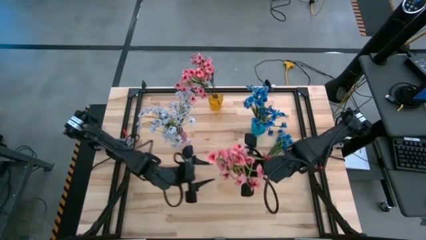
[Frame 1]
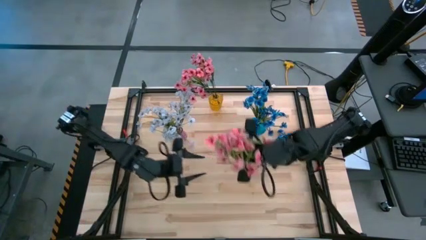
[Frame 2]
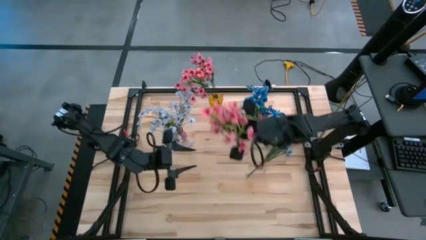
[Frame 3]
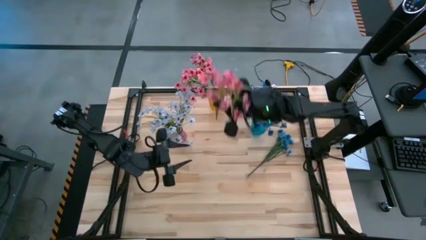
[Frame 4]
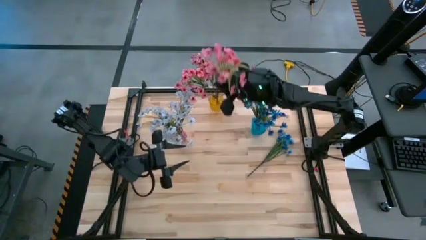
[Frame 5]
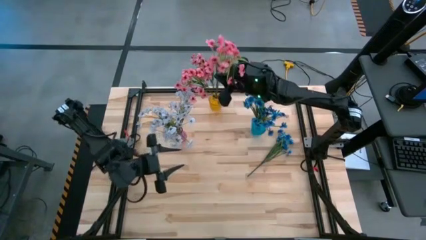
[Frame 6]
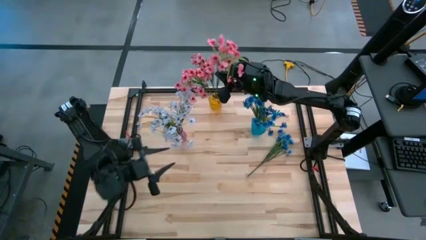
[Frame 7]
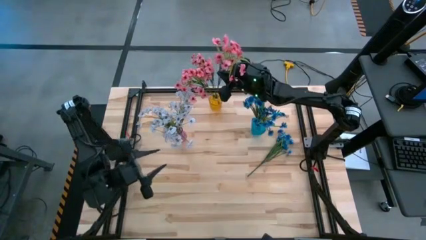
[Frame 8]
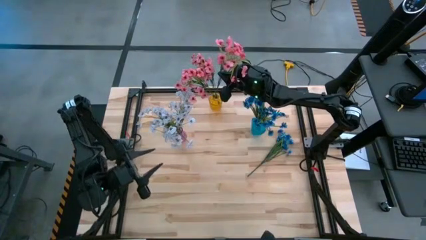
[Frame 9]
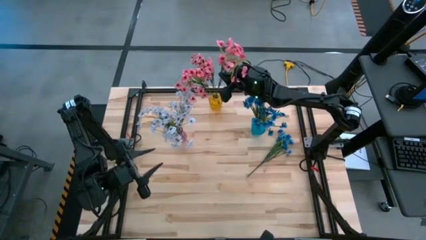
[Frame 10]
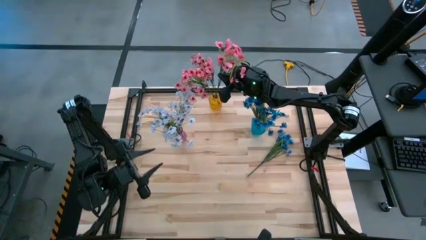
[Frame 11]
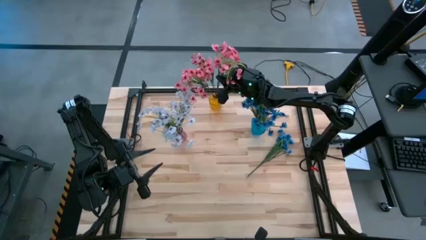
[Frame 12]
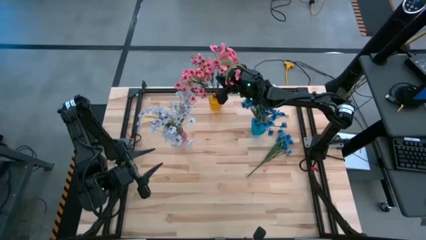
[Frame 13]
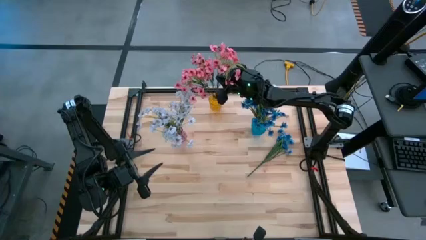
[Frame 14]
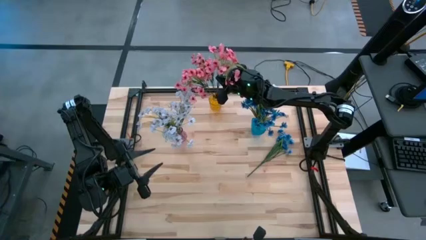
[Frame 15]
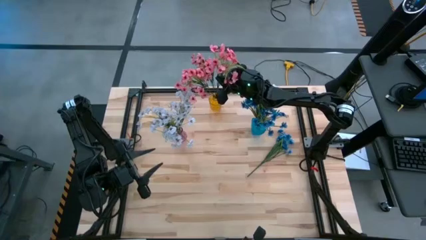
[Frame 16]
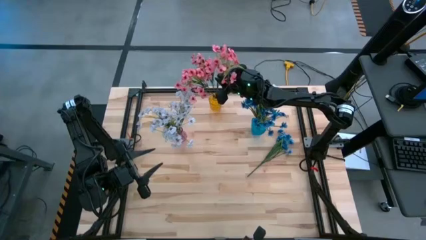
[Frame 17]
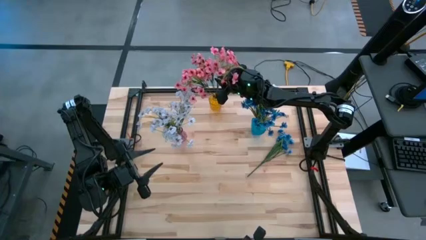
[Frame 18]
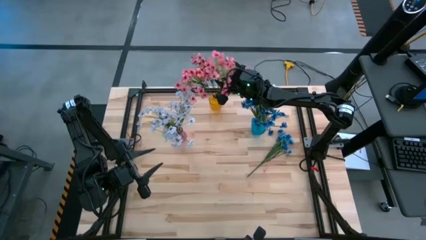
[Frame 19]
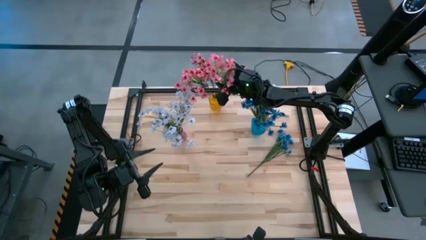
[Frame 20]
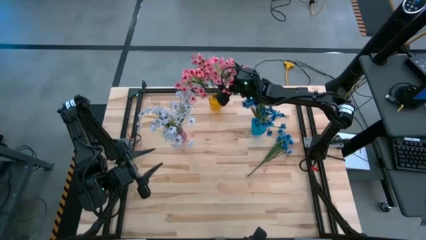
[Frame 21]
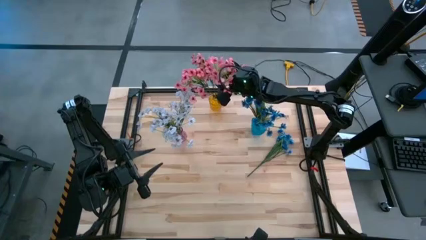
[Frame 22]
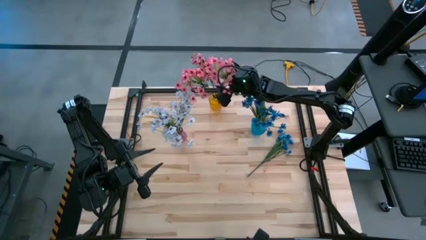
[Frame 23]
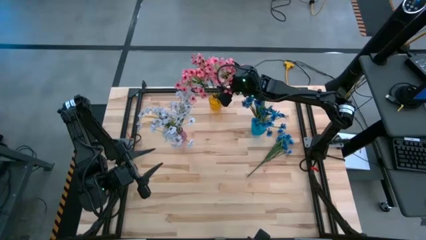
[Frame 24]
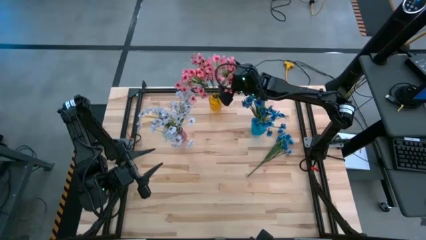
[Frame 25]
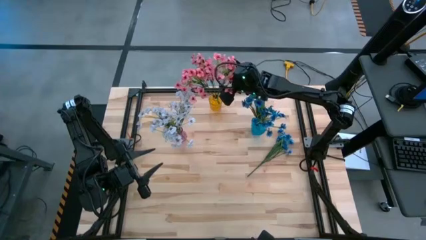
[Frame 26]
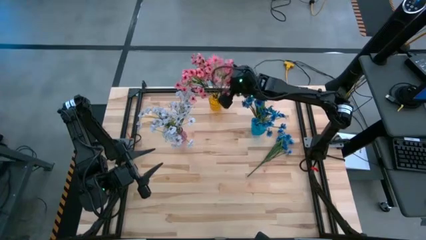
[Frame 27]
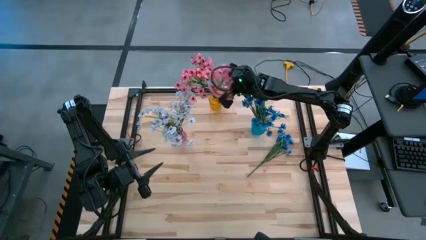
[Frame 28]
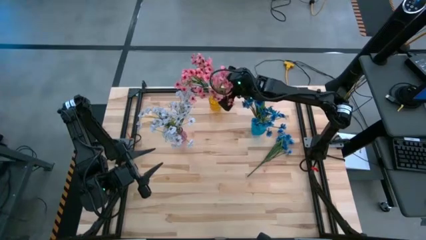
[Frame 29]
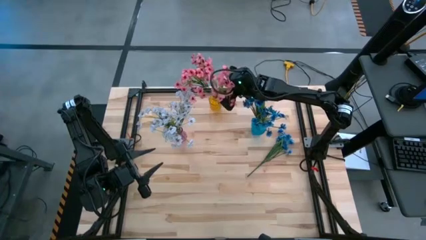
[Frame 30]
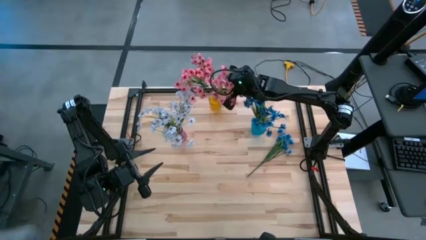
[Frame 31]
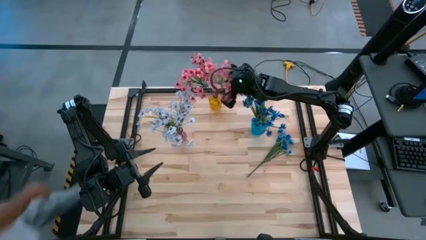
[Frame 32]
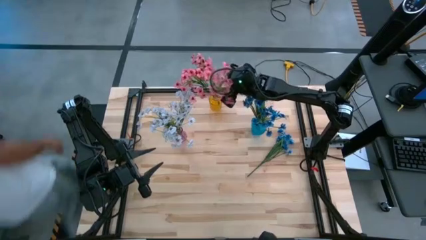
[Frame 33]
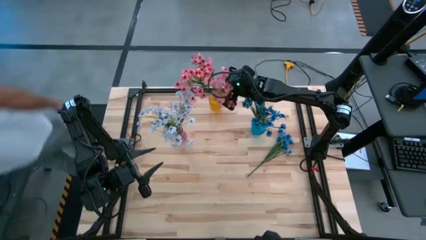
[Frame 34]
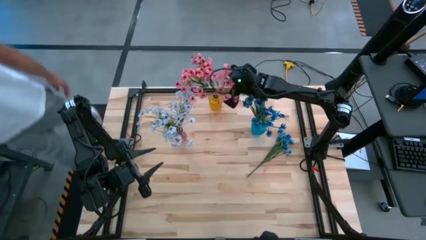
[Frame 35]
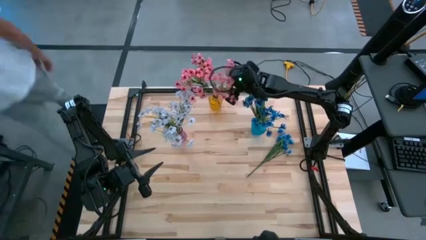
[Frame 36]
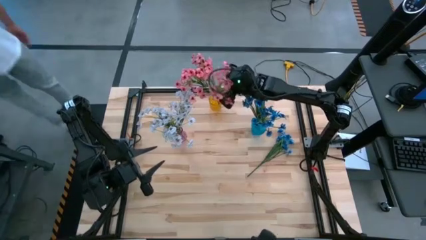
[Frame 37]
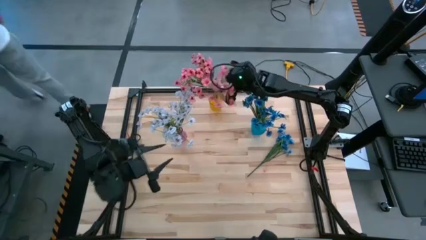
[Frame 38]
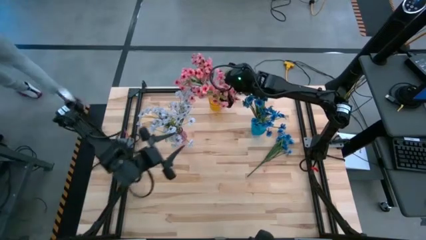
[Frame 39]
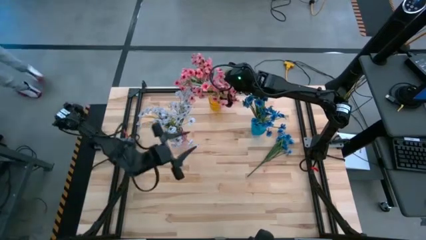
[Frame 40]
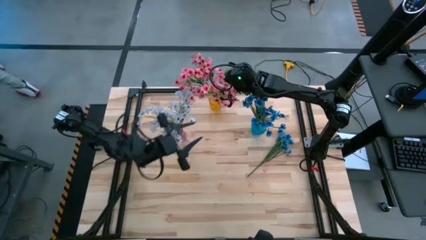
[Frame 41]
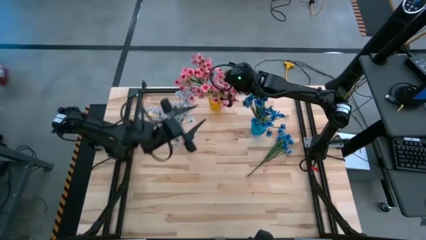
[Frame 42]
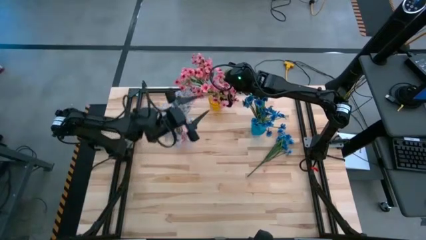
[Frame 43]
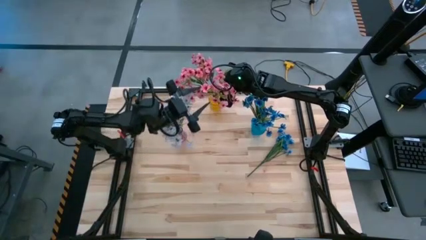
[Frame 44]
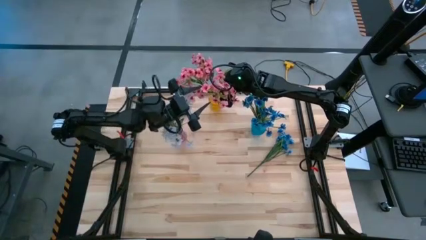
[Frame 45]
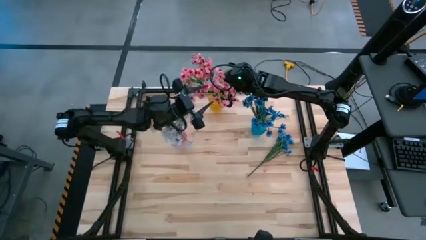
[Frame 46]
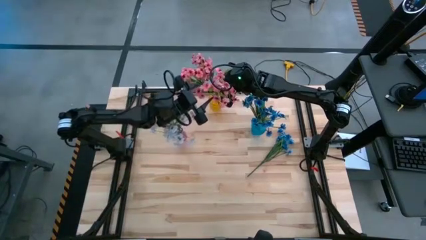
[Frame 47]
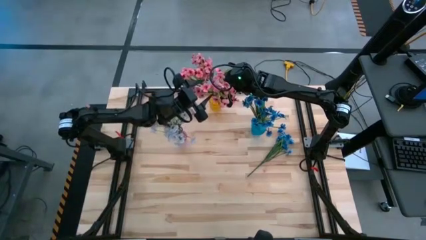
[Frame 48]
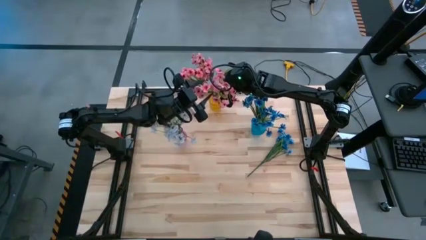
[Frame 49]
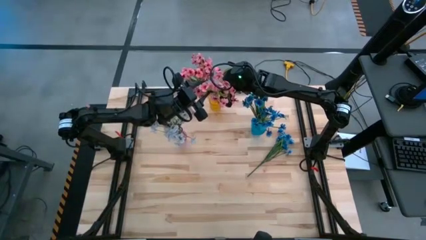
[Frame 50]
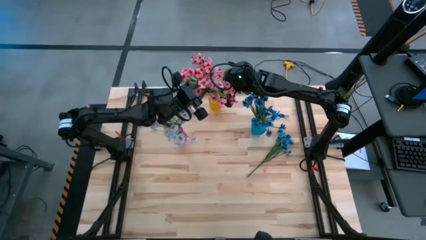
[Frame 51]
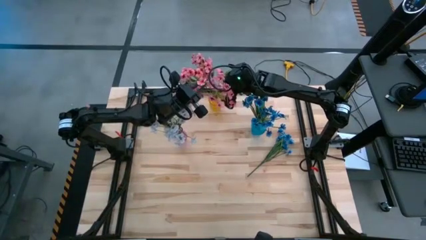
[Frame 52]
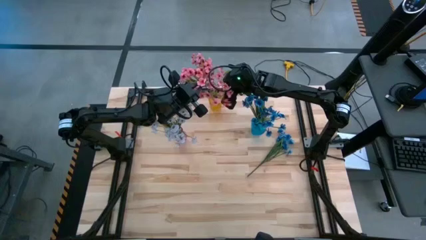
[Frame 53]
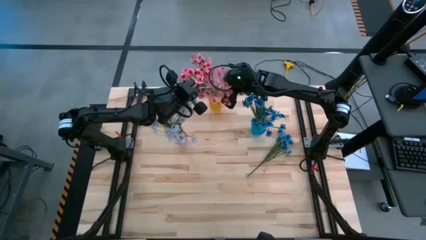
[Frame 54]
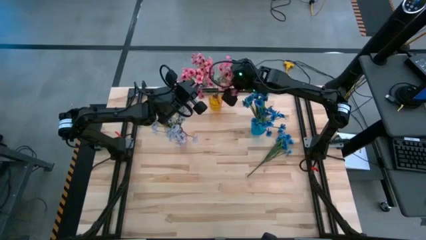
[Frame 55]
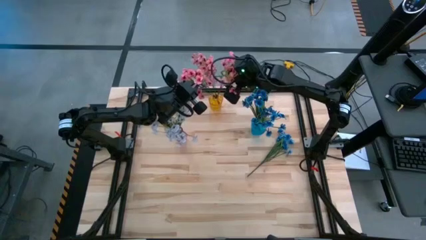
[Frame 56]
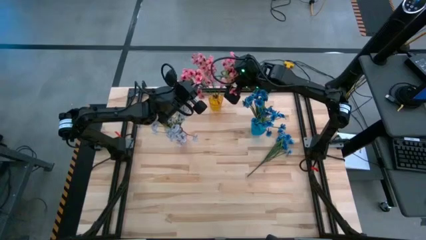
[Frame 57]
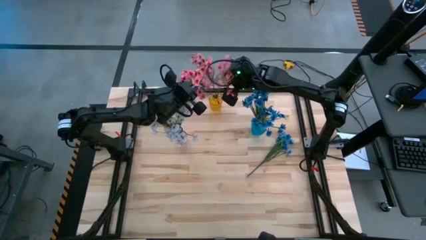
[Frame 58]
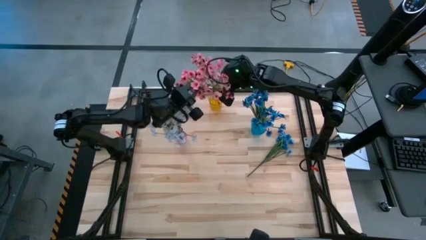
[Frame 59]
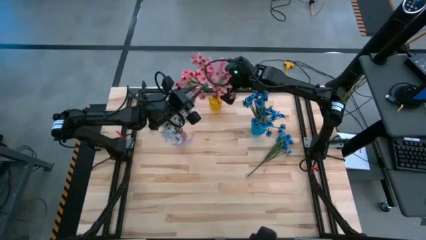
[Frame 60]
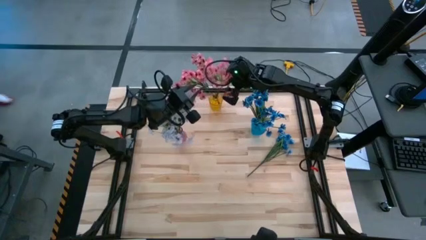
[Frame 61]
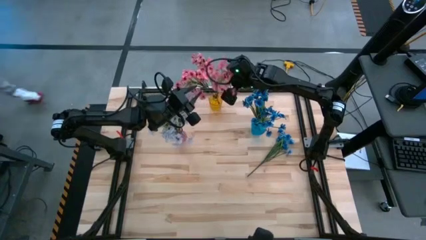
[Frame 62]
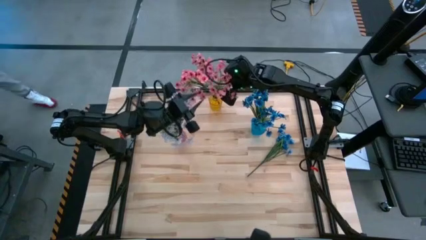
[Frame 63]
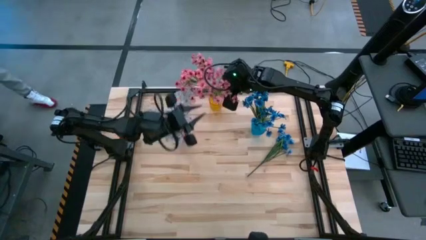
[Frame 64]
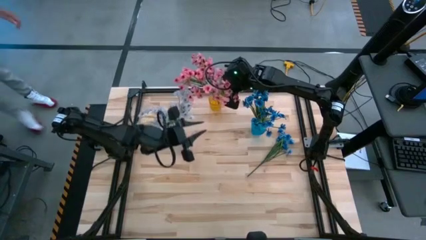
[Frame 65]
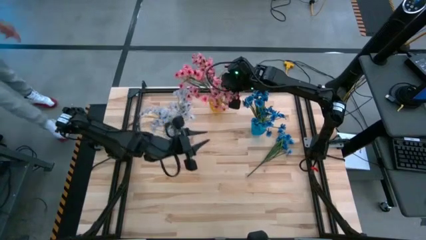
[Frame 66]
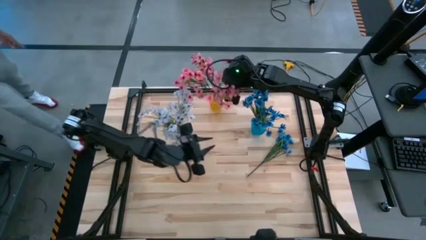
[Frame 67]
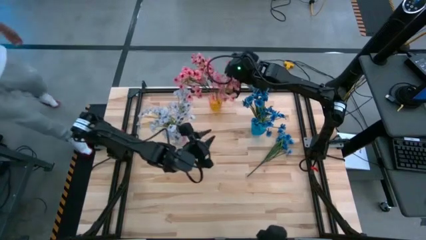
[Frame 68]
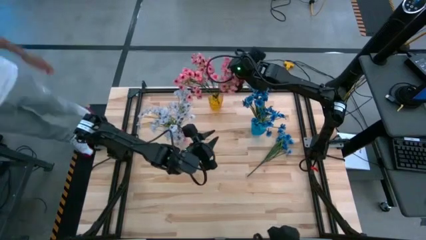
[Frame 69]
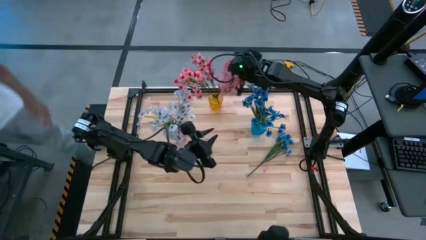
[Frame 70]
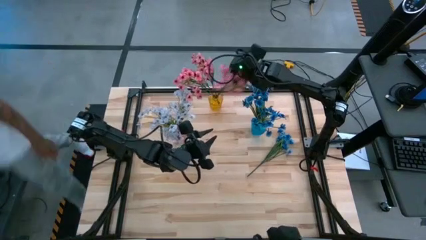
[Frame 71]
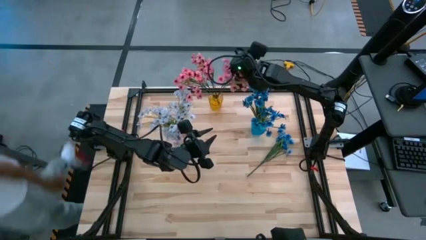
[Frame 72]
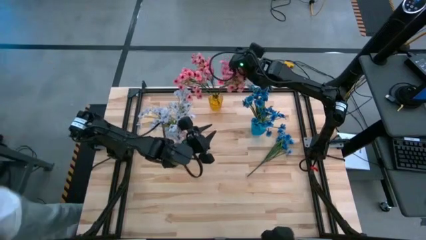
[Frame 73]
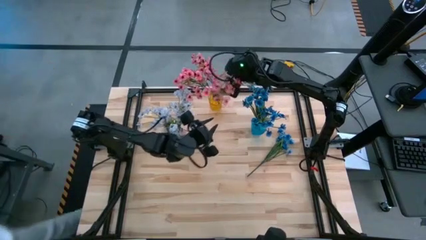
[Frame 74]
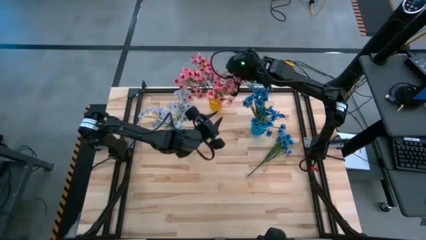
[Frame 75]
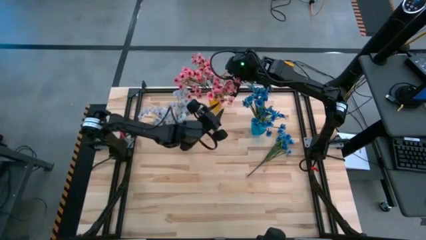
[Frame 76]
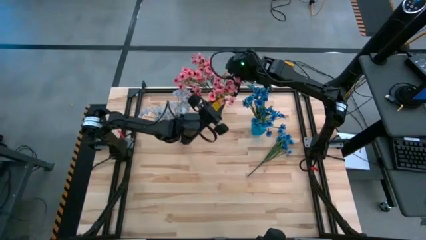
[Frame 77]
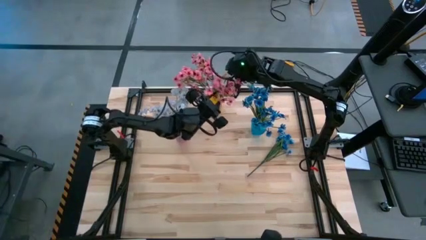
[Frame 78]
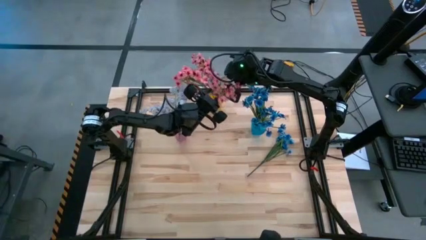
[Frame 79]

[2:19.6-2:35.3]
Task: Sort flowers into vase by color
Put the pink flowers into the yellow vase

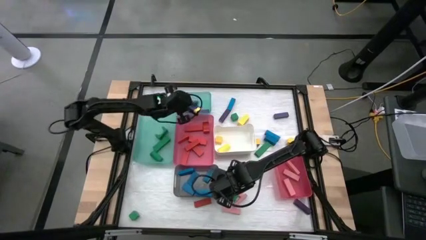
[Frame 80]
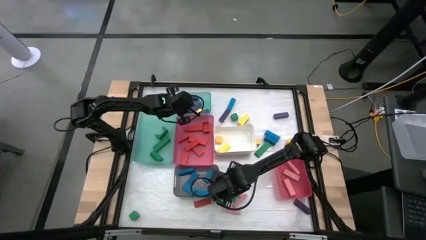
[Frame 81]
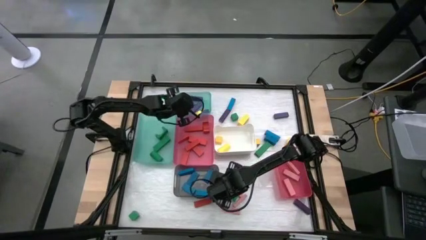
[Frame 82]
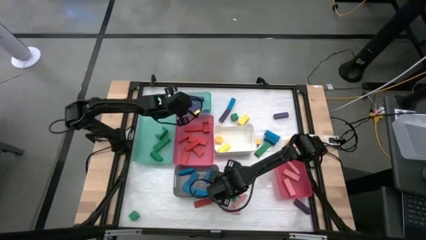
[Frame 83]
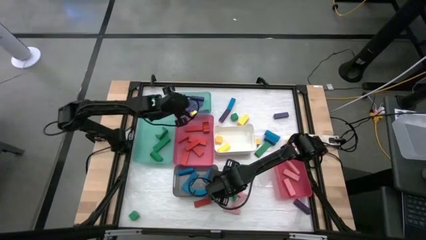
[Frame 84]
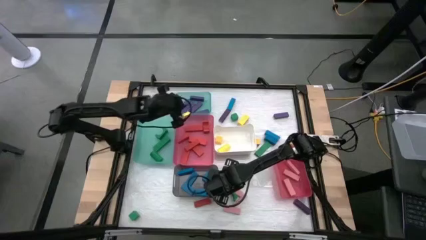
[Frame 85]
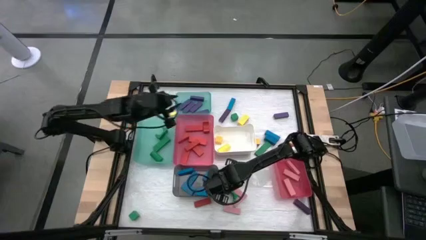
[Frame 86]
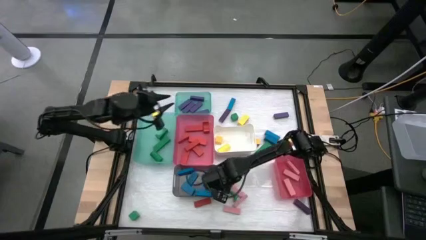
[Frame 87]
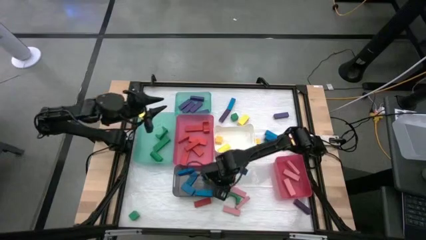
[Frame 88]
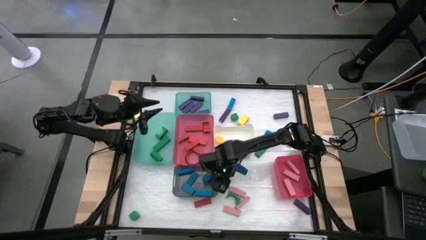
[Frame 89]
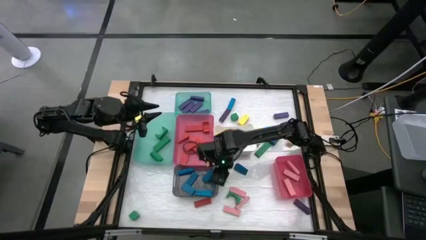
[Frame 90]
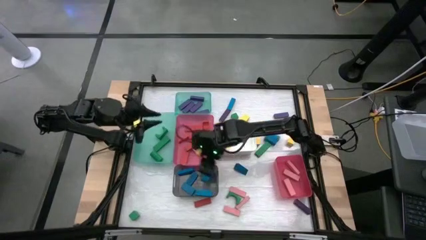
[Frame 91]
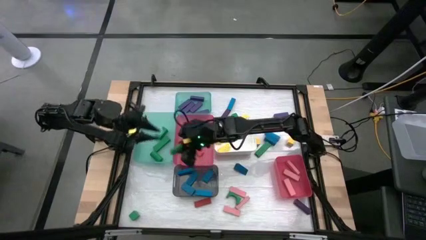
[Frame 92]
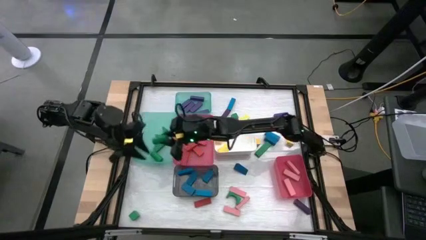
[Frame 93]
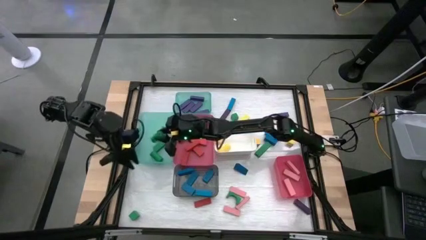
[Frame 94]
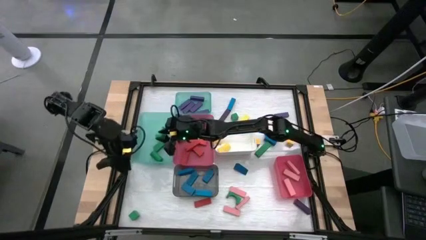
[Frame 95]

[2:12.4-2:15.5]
Task: Sort blocks
Put the green block into the bottom green bin
